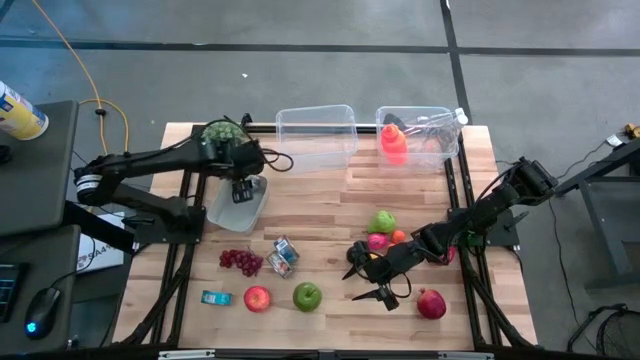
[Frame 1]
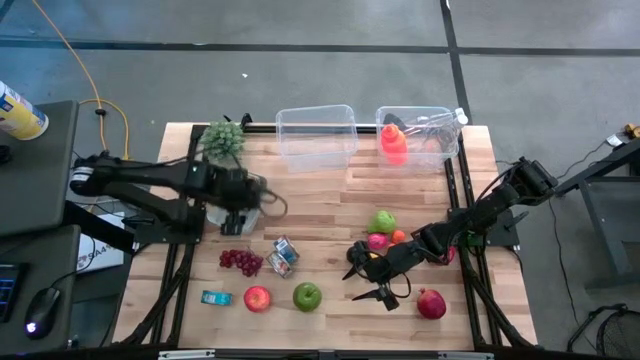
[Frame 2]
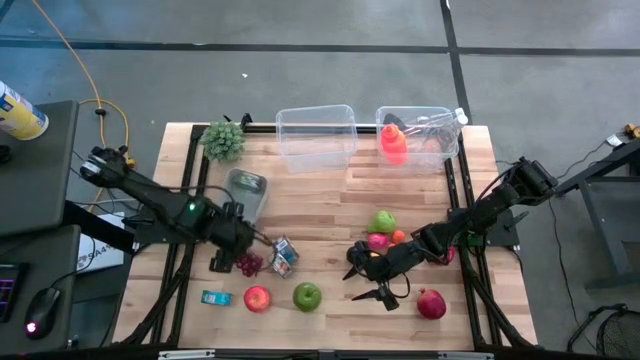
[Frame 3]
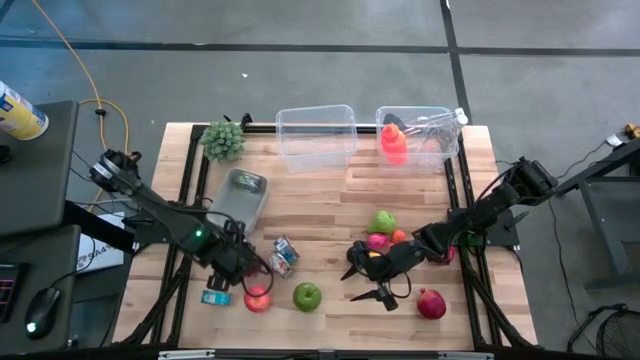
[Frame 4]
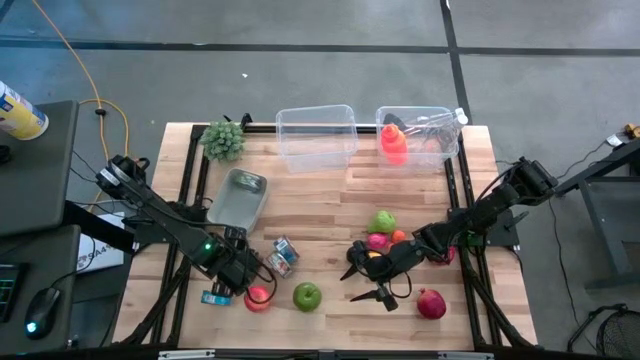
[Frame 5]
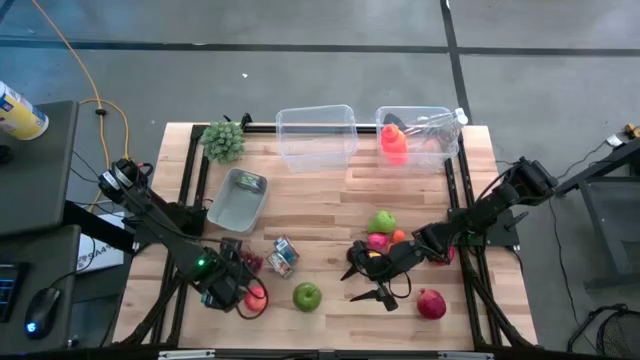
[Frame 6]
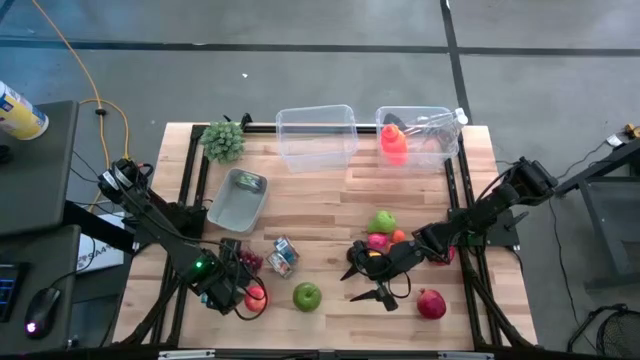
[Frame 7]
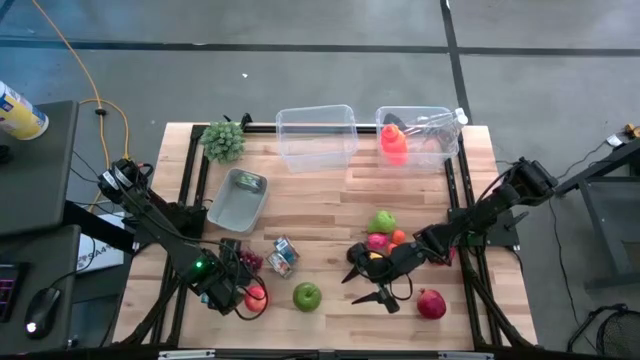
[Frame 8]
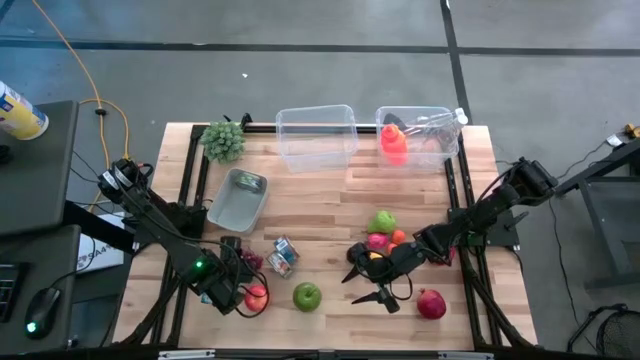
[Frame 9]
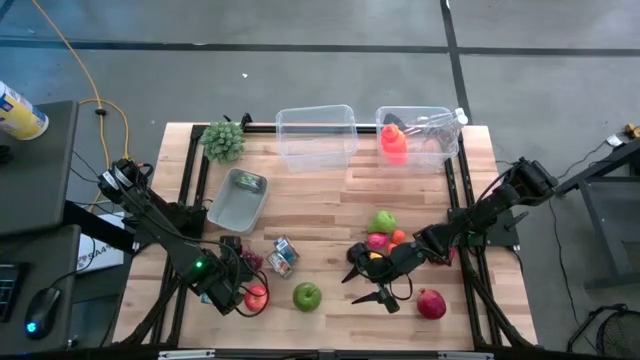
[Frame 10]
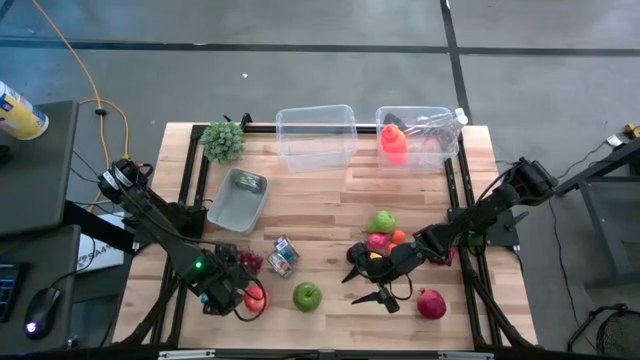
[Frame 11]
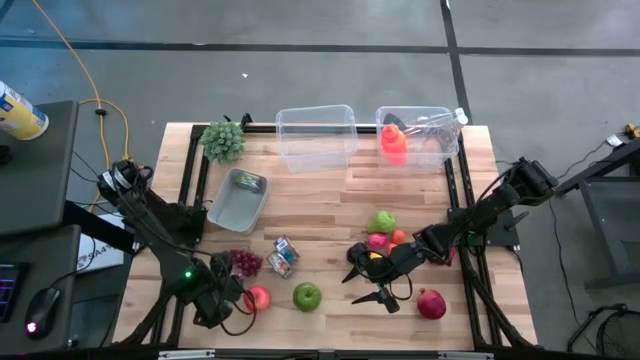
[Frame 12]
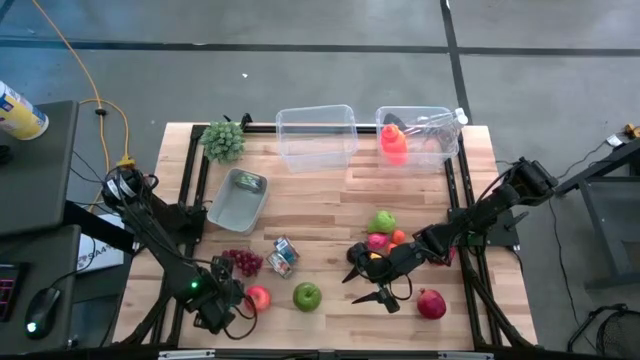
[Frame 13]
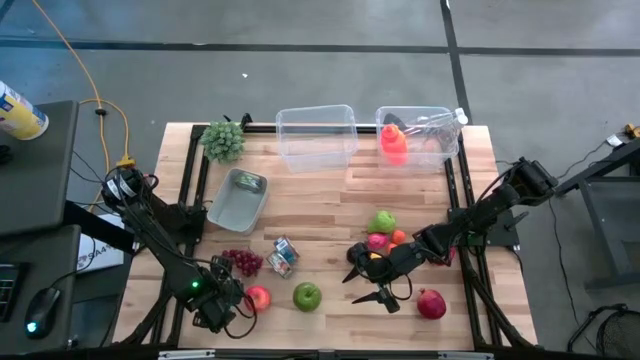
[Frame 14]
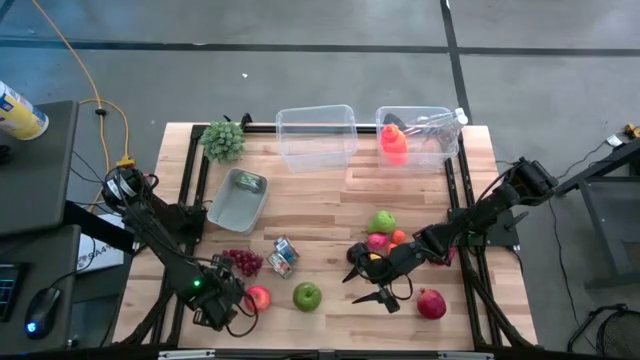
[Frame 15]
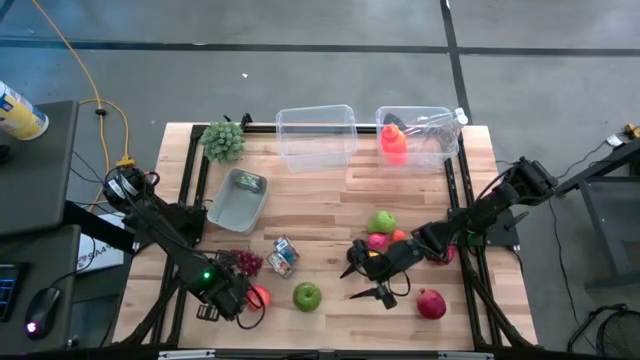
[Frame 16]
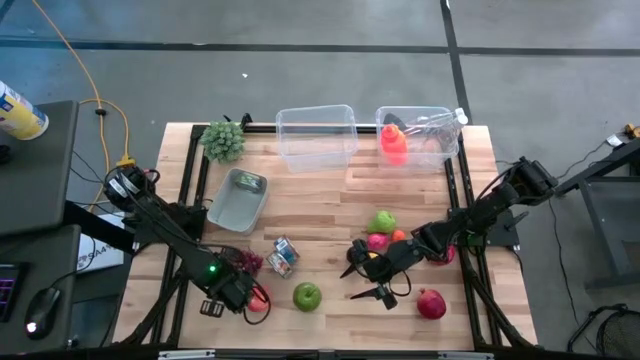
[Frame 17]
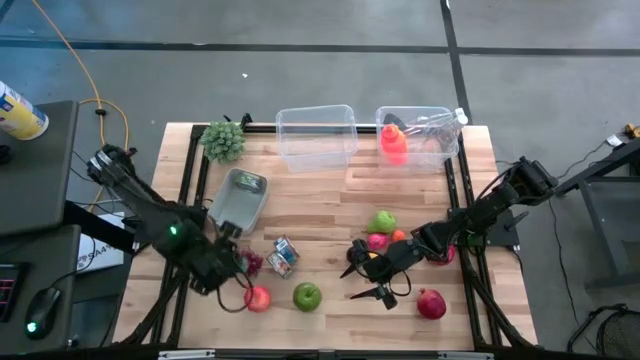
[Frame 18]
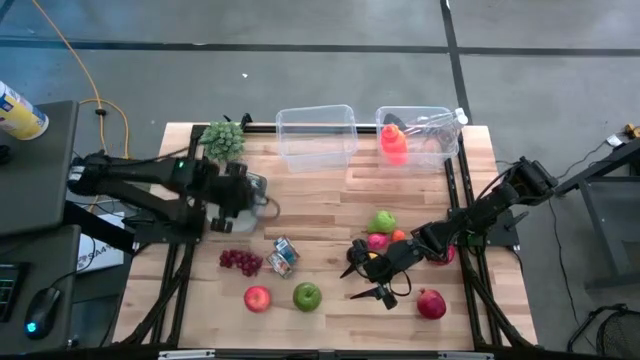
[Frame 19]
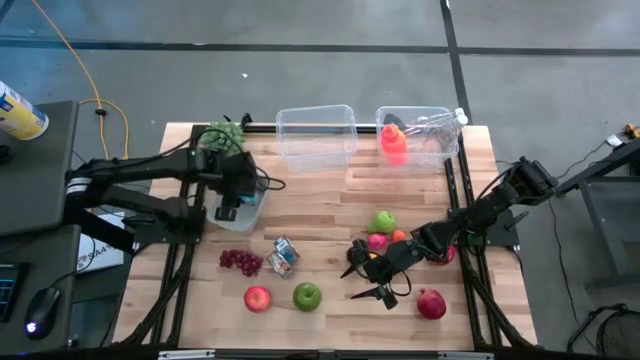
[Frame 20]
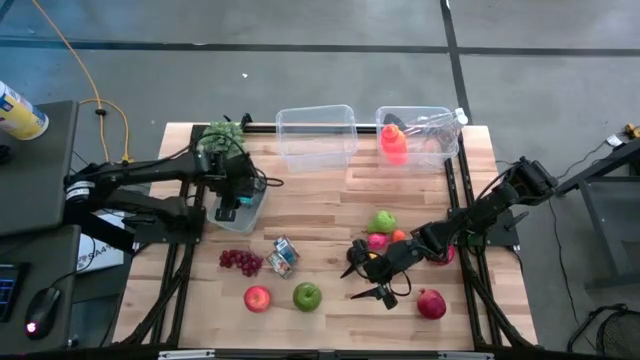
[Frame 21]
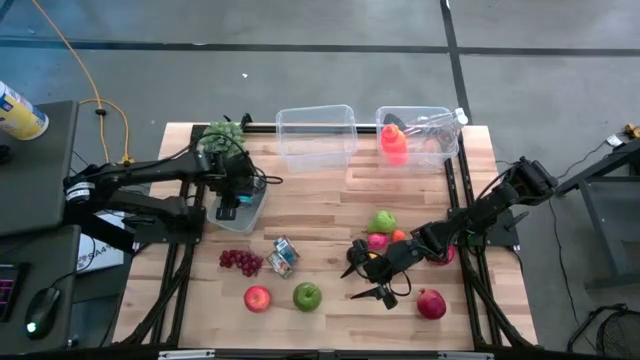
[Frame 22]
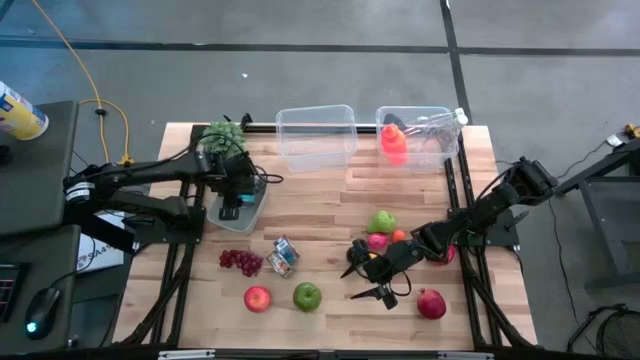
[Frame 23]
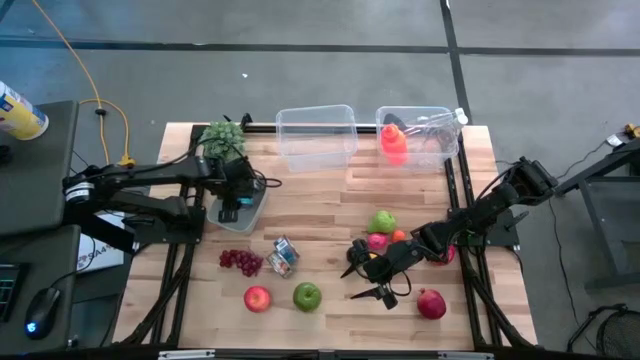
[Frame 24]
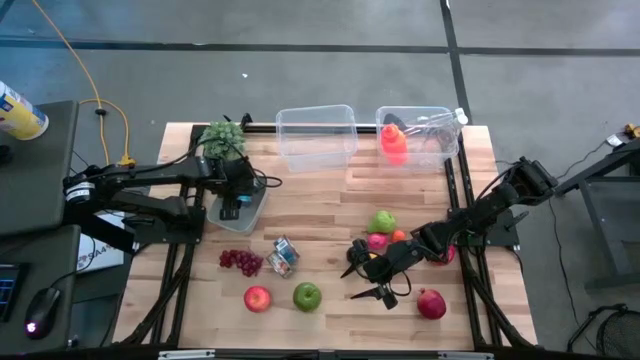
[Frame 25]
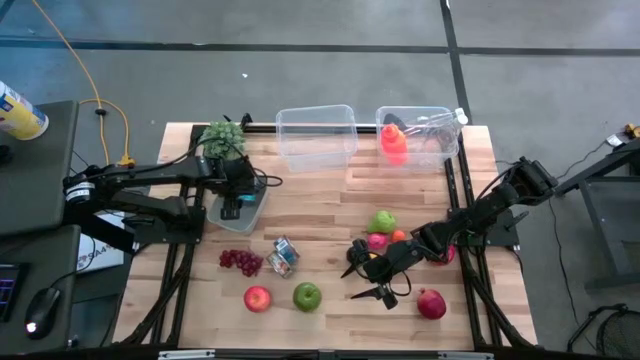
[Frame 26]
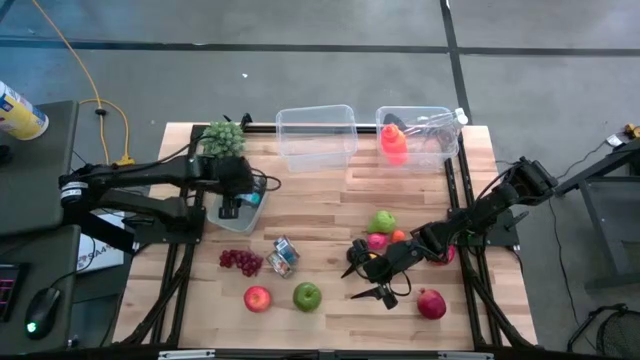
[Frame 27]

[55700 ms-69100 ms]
Task: Pick & Place Food Item
Put the yellow blue tuna can into the bin

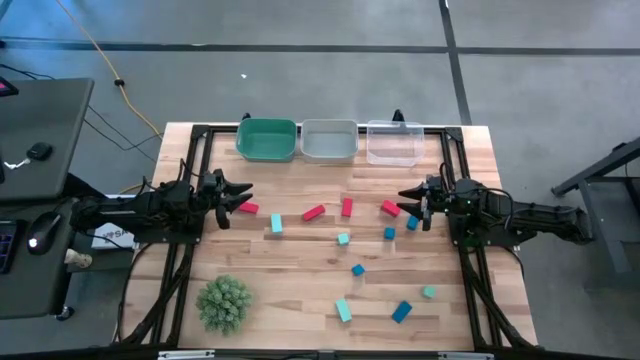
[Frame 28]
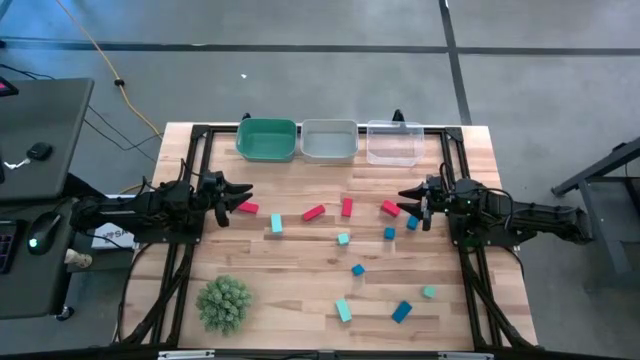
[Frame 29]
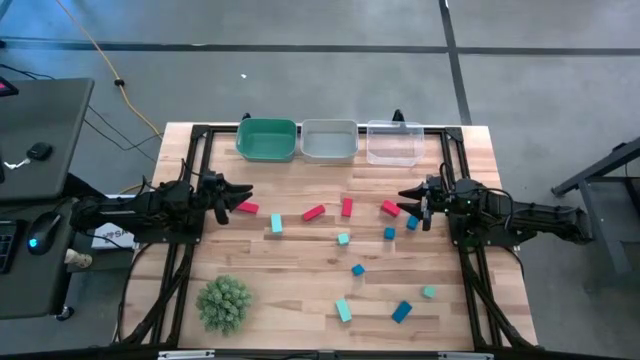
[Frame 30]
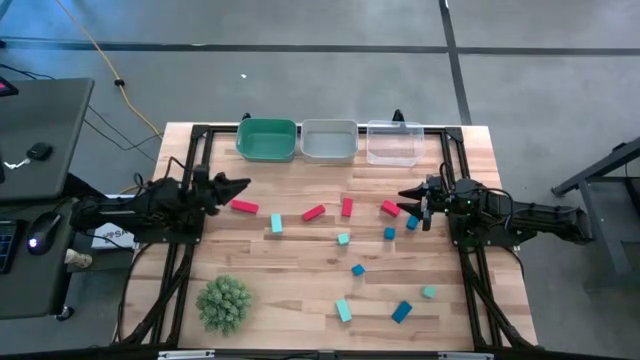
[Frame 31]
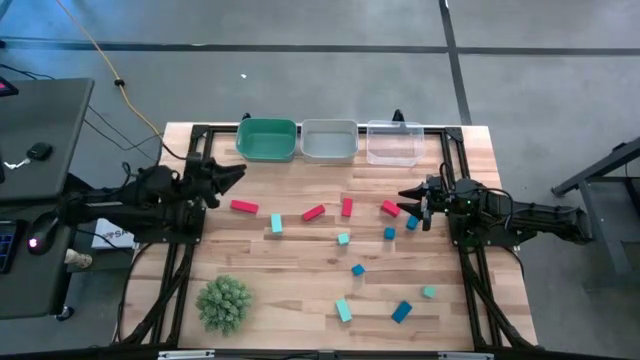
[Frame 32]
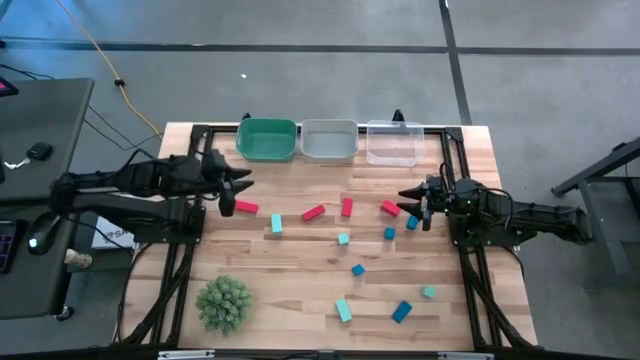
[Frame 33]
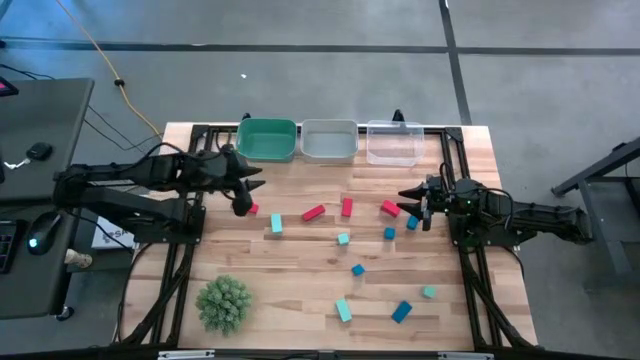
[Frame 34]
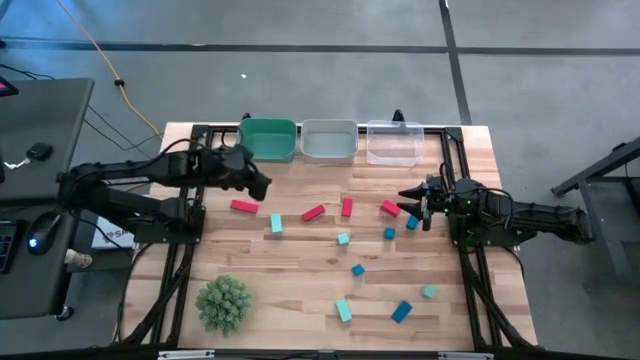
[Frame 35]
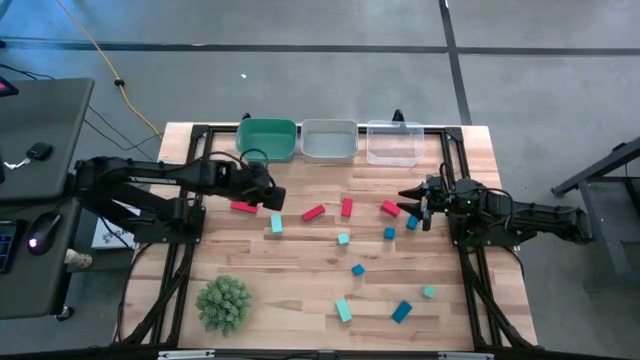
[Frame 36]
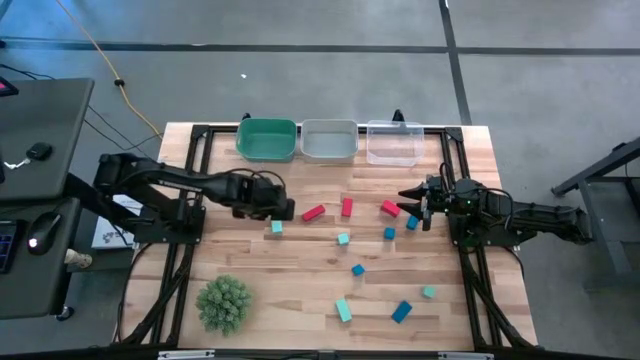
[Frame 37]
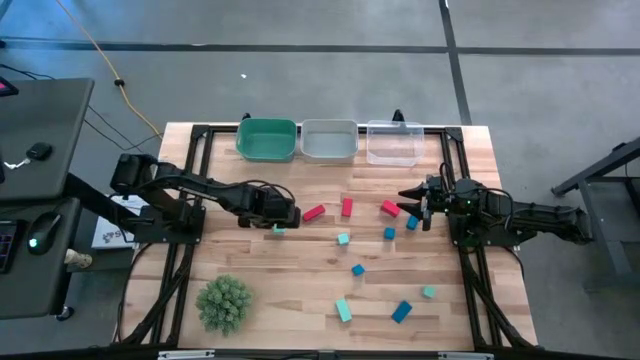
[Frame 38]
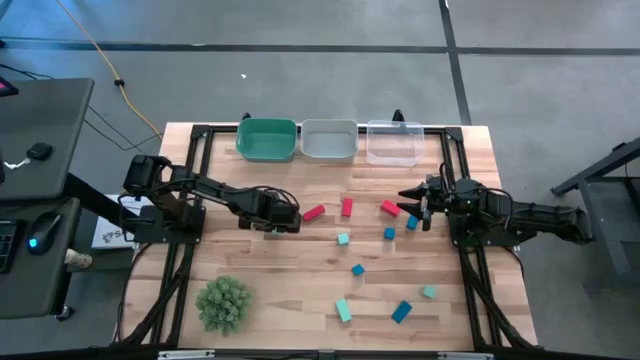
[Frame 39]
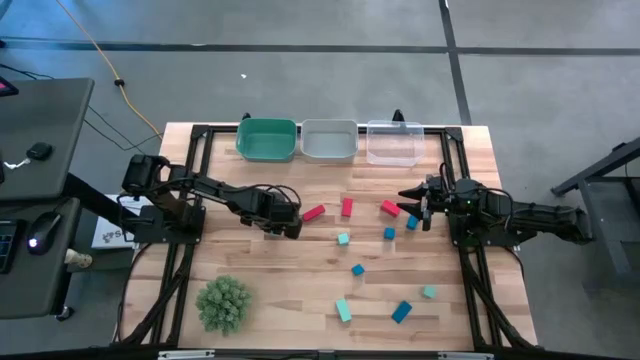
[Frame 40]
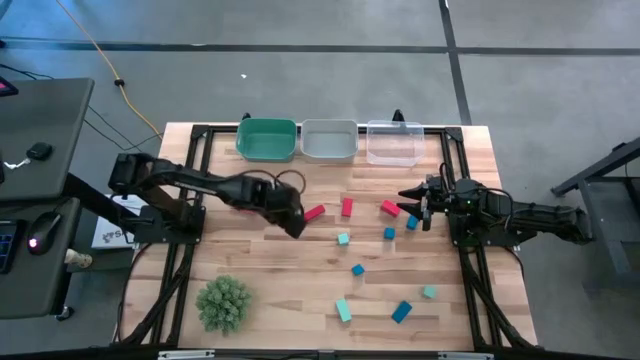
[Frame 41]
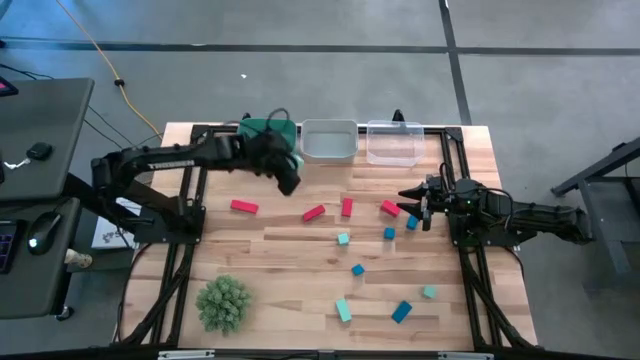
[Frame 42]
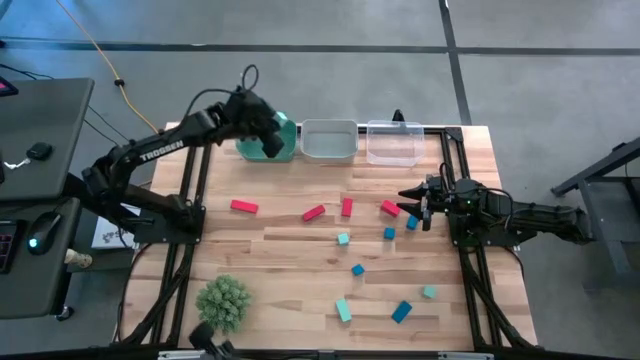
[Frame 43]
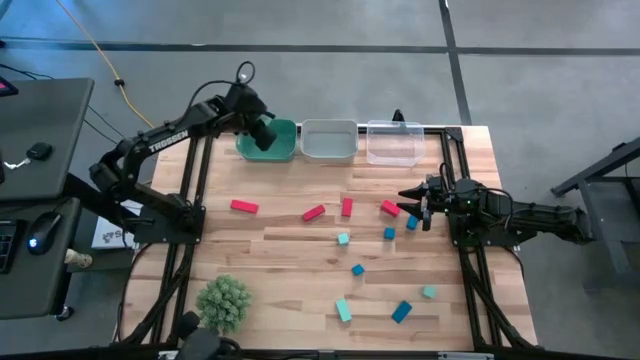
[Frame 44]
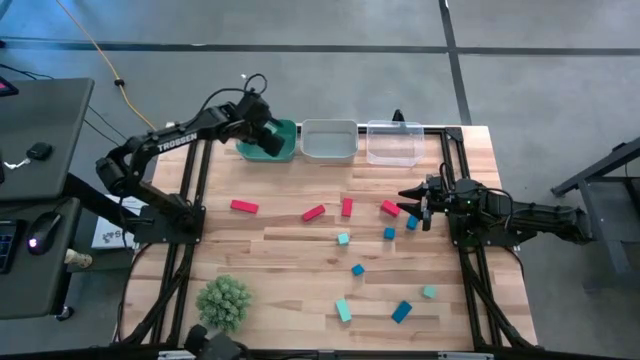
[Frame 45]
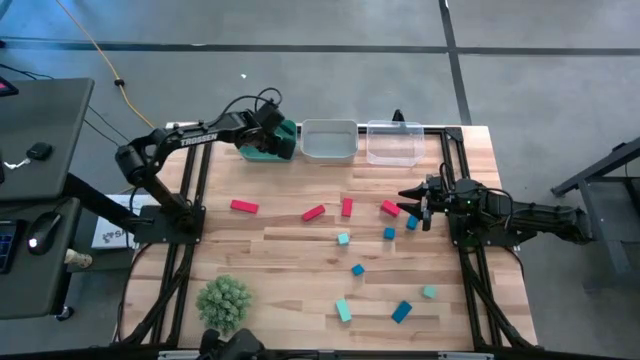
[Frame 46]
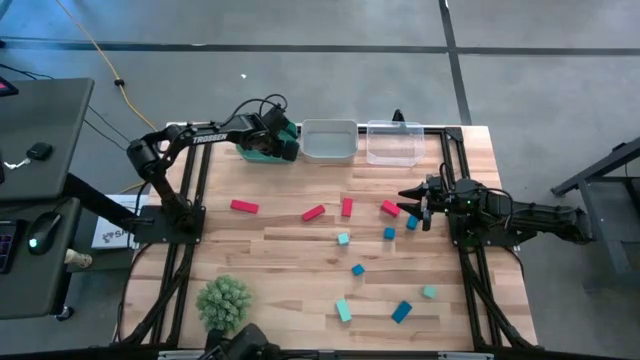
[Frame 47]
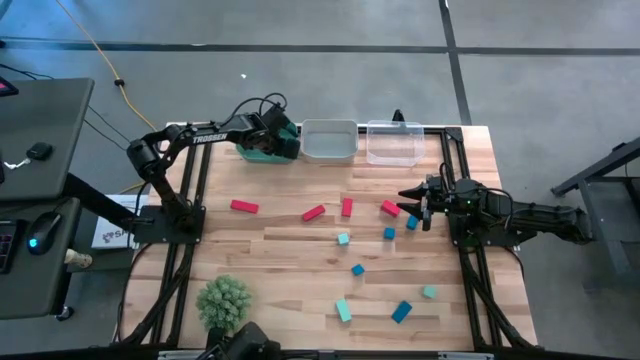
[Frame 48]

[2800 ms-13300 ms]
Task: Sort & place blocks by color
Put the light blue block into the green bin
